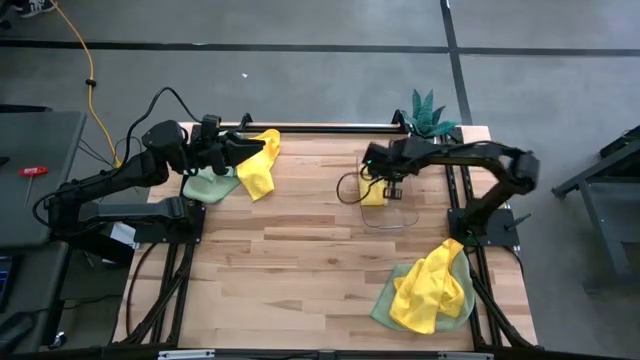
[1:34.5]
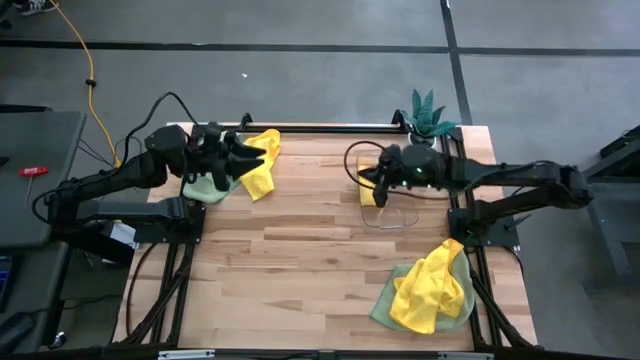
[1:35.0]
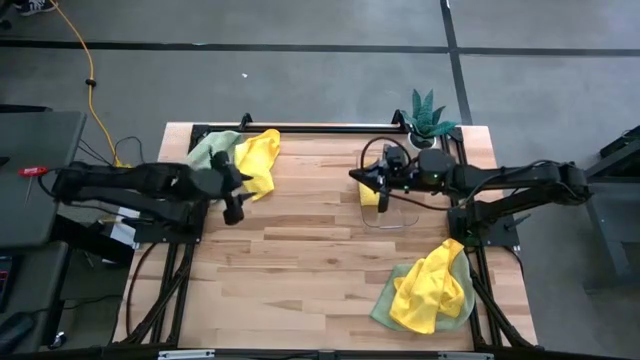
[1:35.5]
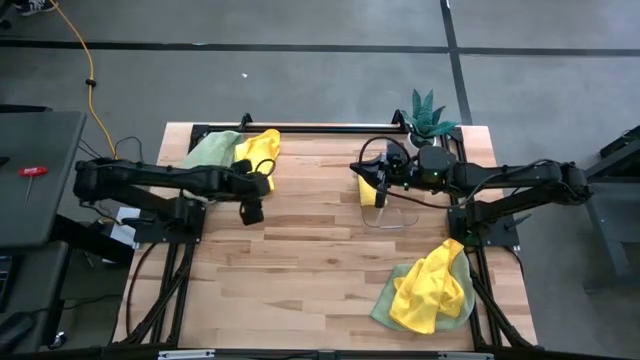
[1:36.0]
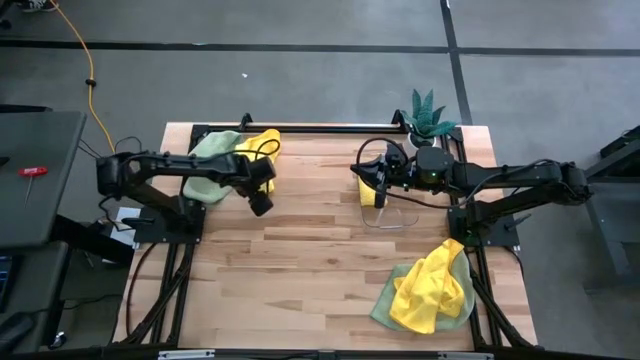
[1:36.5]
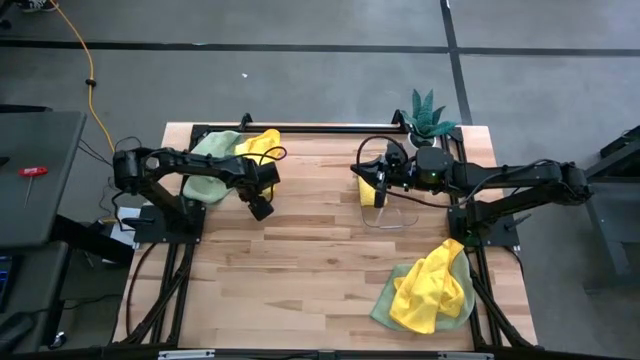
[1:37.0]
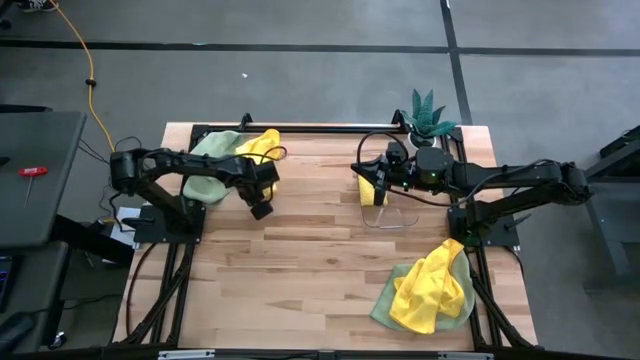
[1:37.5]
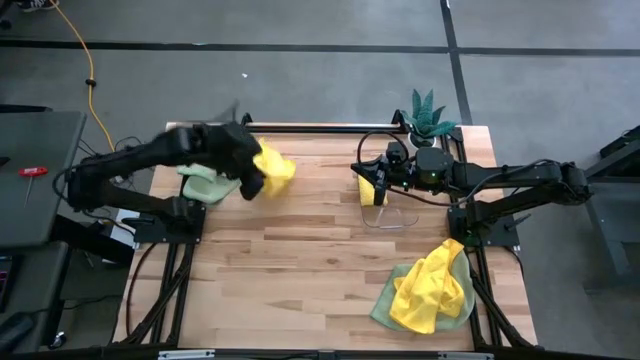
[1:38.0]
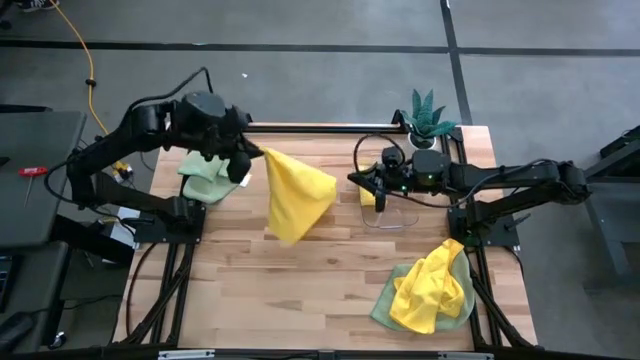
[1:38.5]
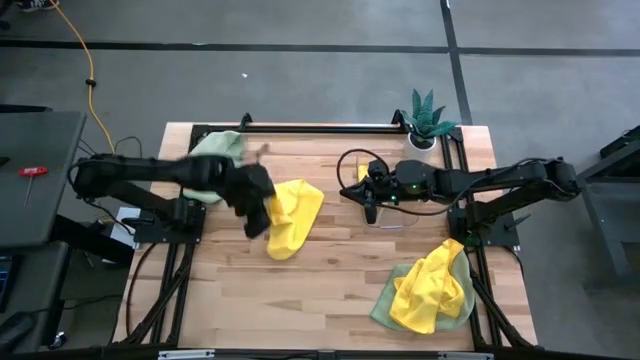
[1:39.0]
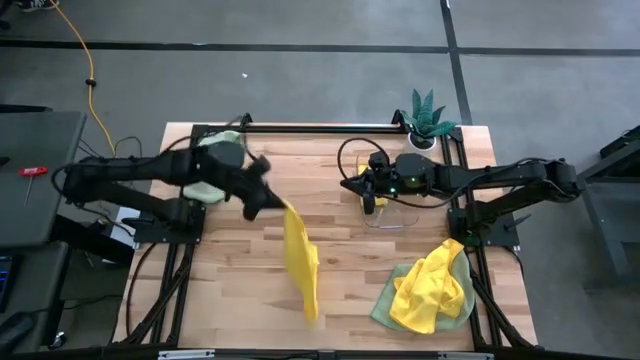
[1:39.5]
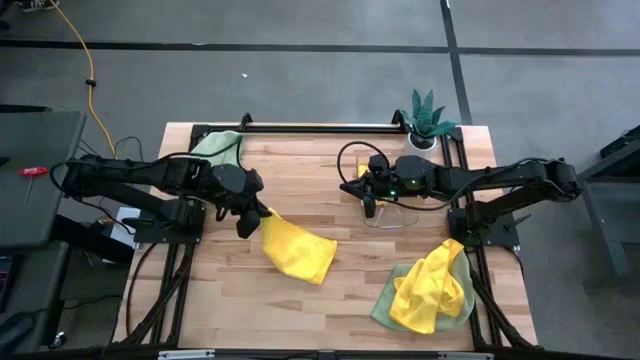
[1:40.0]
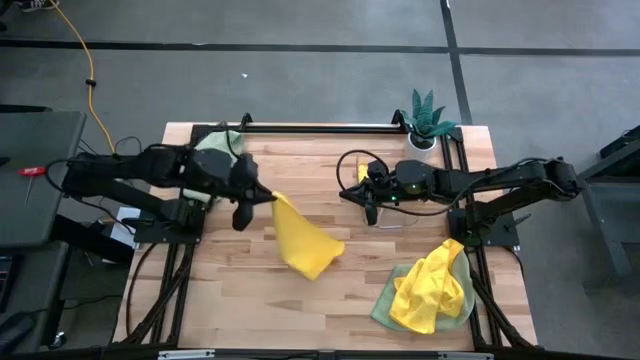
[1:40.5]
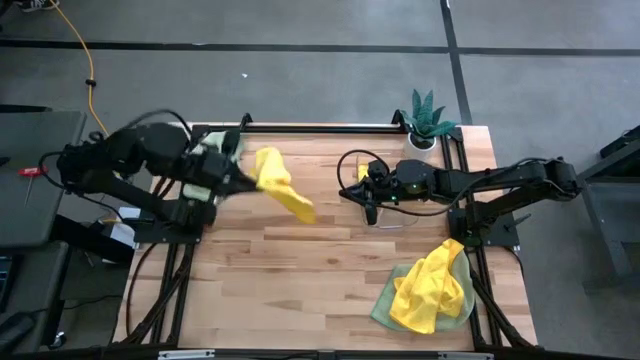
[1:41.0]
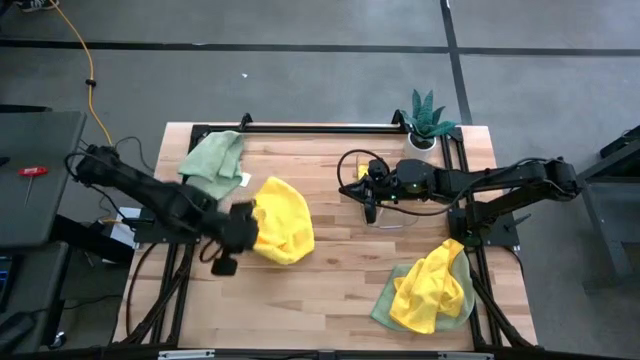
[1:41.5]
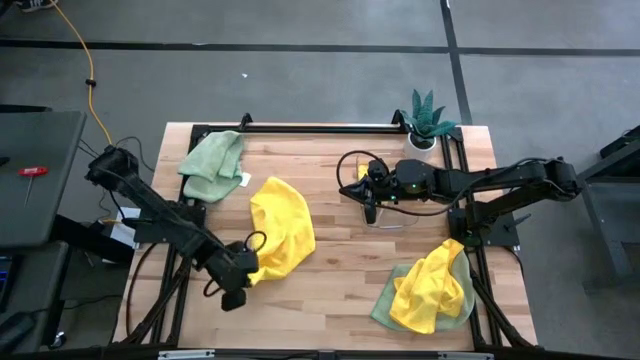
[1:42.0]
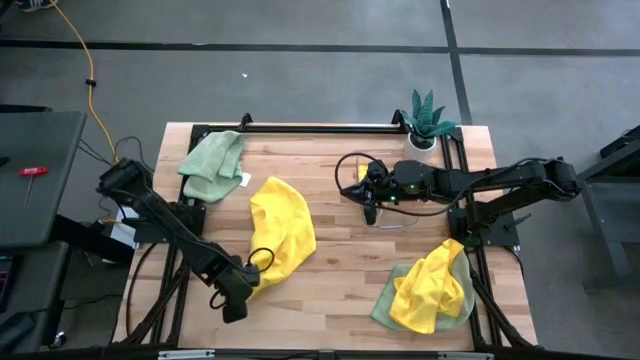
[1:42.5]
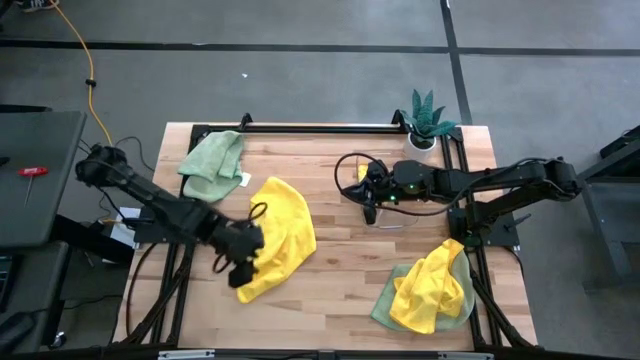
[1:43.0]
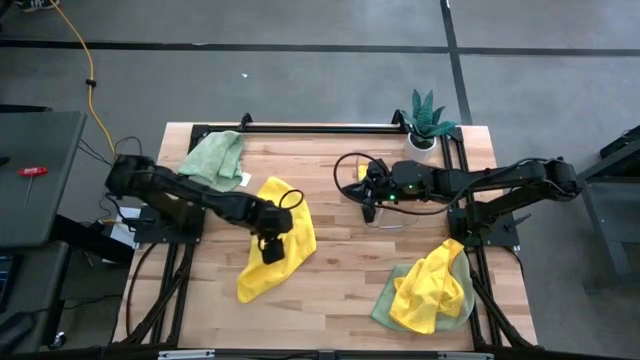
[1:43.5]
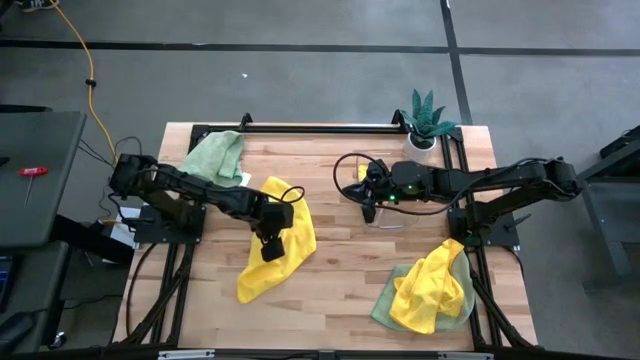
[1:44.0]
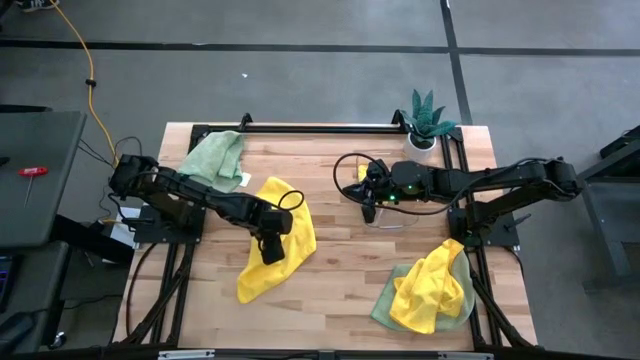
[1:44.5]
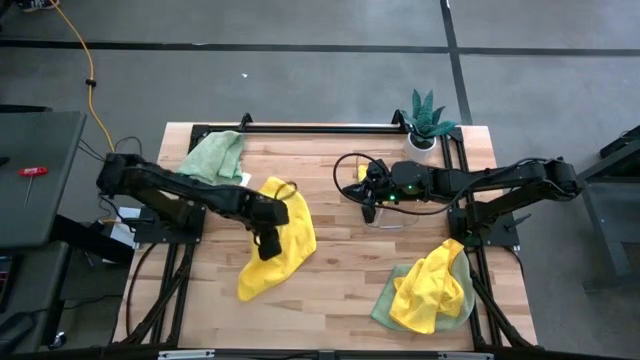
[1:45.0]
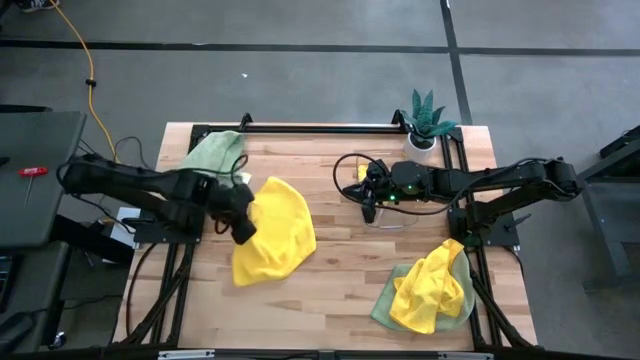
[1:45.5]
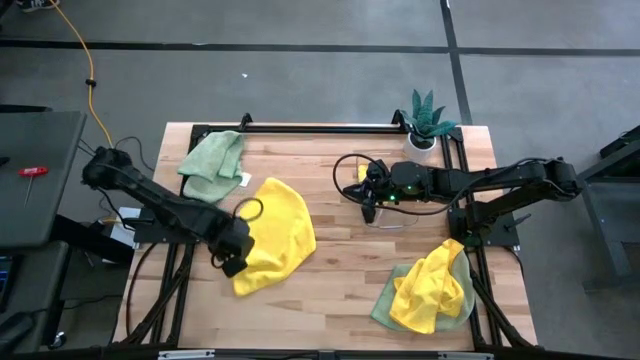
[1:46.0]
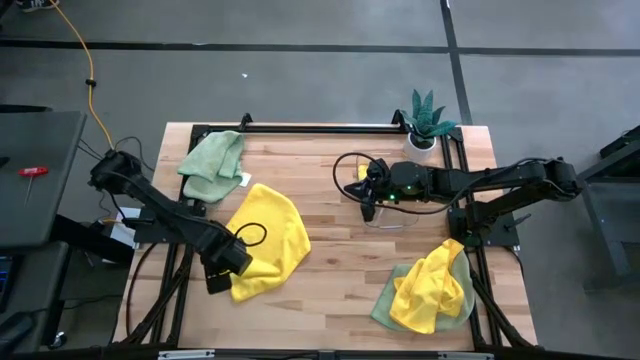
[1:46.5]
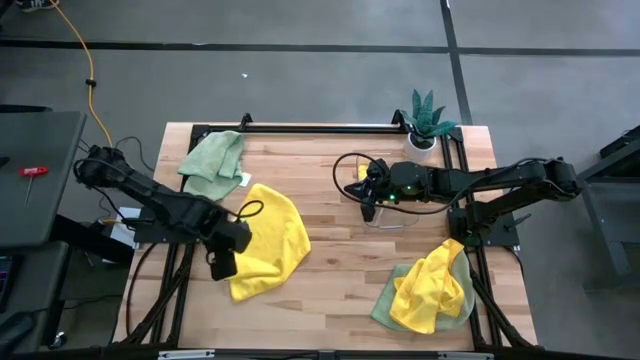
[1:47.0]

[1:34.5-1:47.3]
Task: Fold microfiber towels
Fold the top yellow microfiber towel

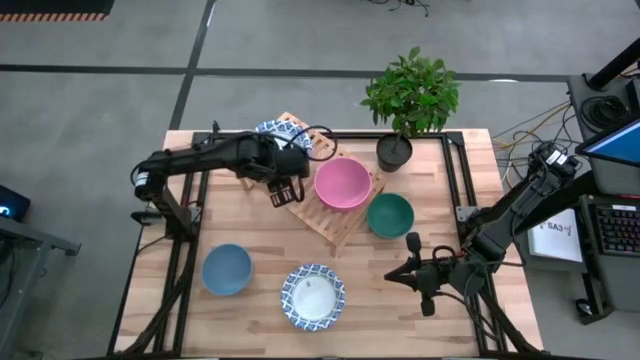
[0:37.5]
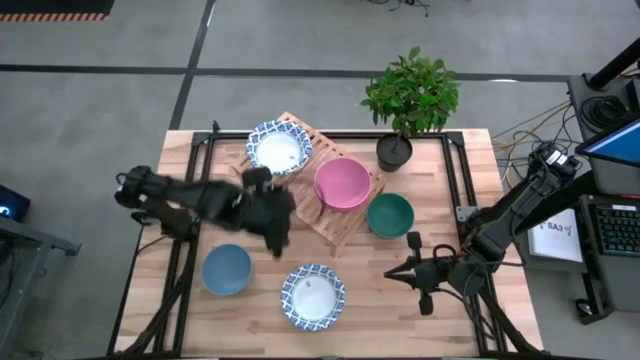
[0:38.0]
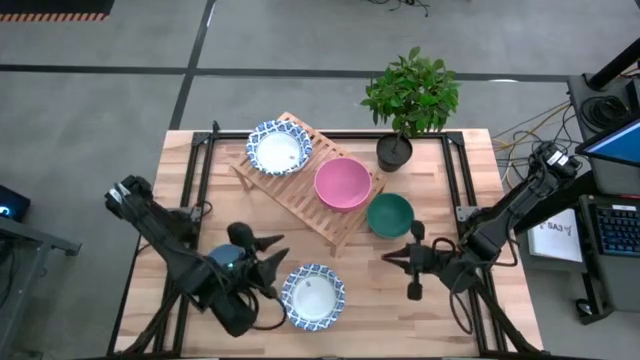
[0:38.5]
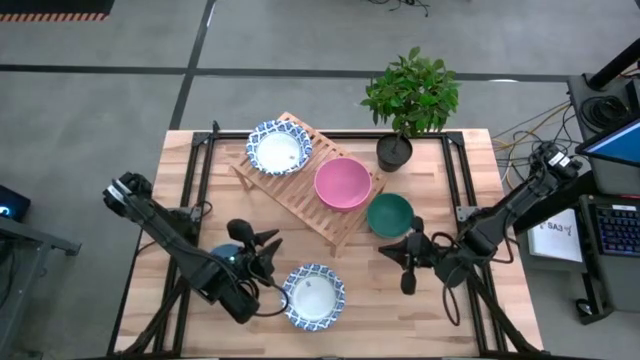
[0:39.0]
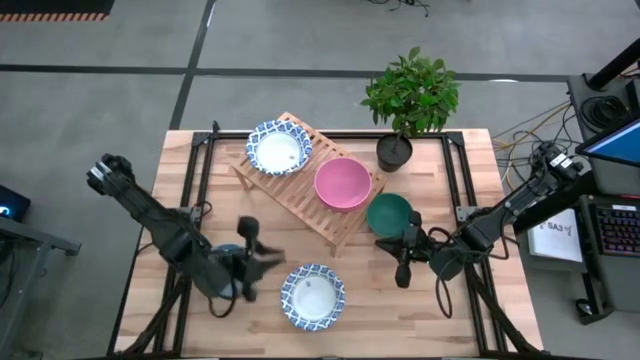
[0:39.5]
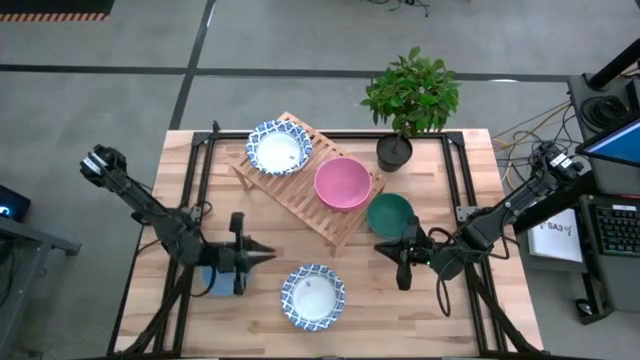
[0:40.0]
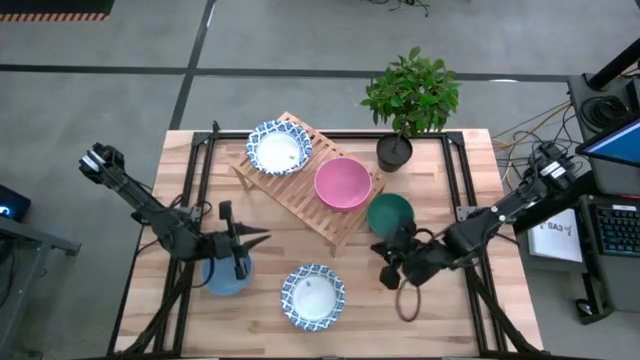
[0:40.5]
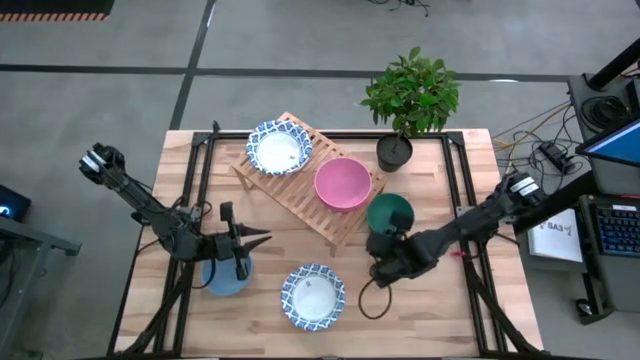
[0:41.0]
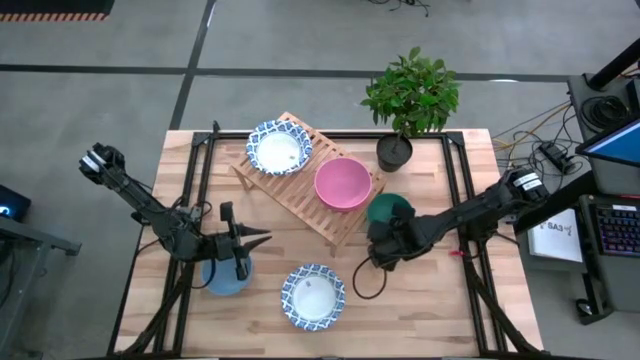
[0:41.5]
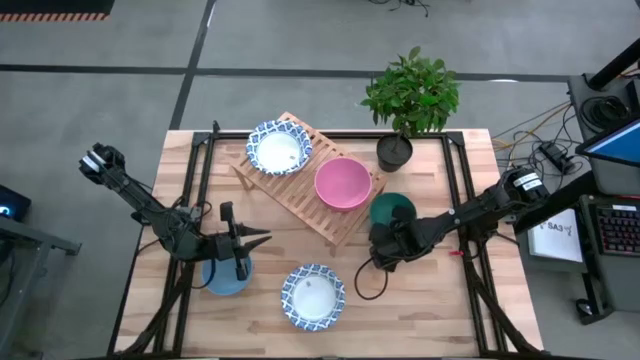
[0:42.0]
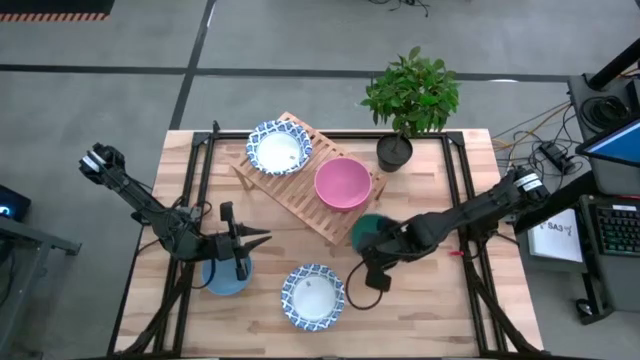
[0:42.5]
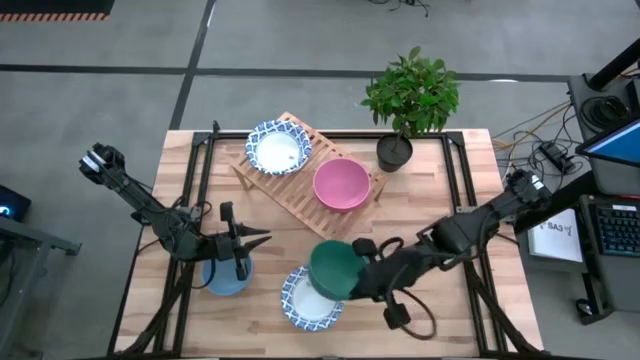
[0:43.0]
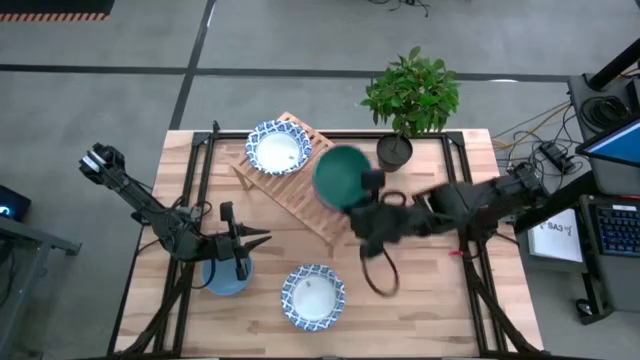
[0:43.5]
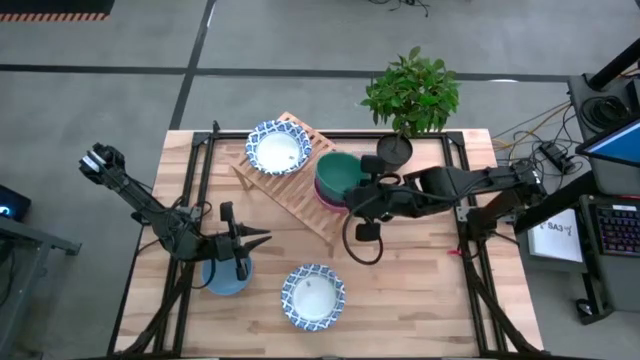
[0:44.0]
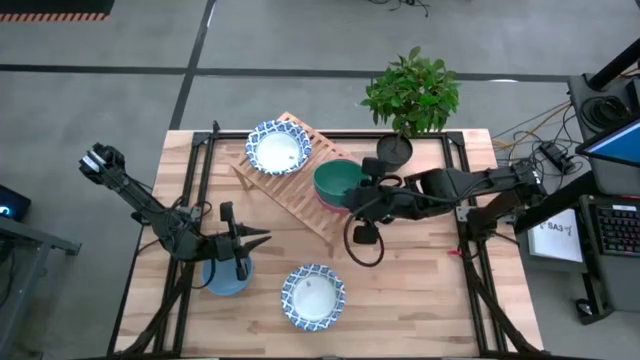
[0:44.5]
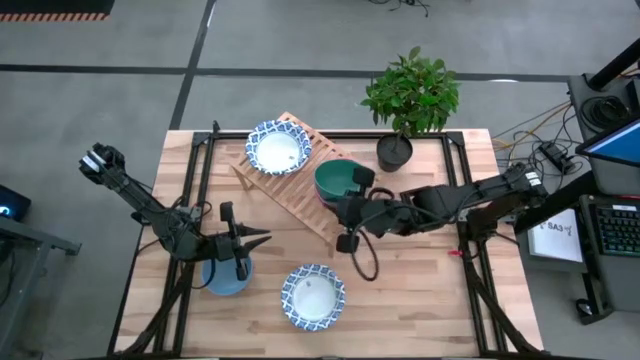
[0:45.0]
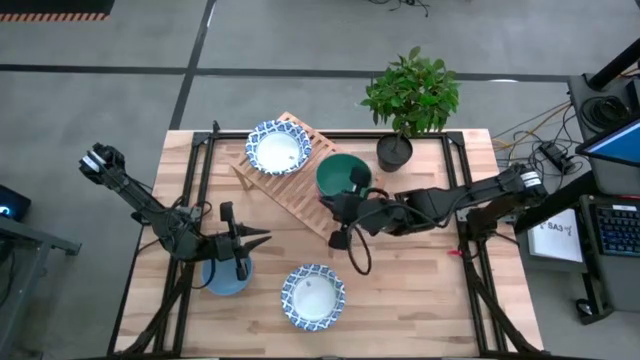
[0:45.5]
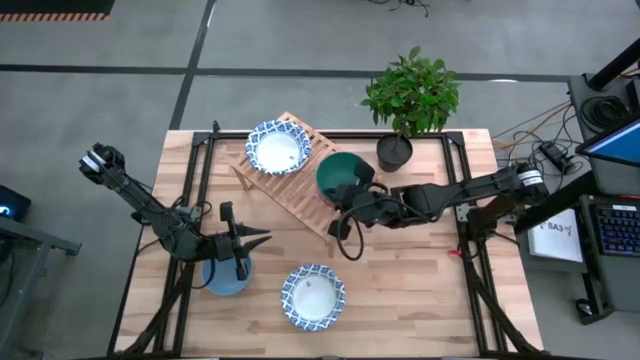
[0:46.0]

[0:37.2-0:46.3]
Task: Place and stack bowls onto a shelf
Stack the green bowl on top of the pink bowl on the shelf
